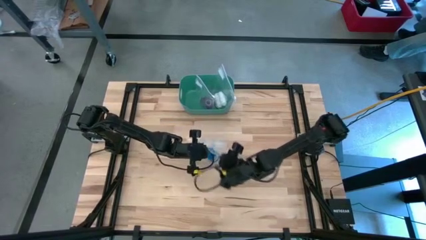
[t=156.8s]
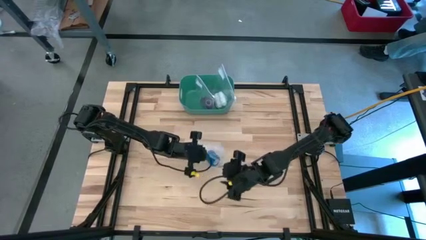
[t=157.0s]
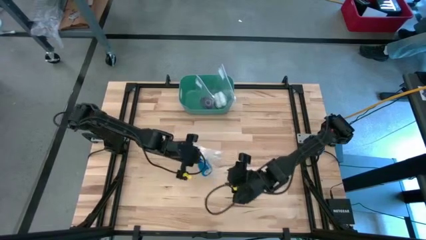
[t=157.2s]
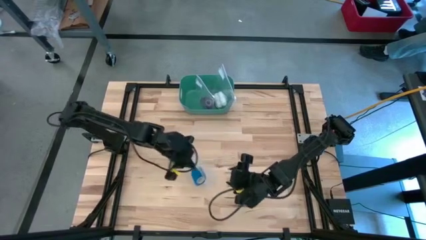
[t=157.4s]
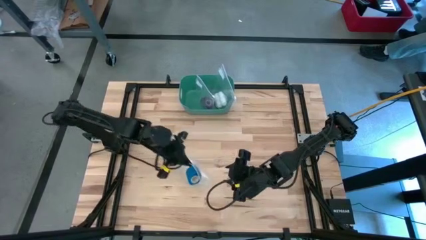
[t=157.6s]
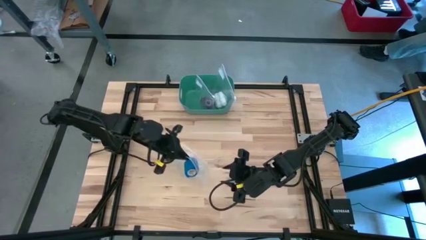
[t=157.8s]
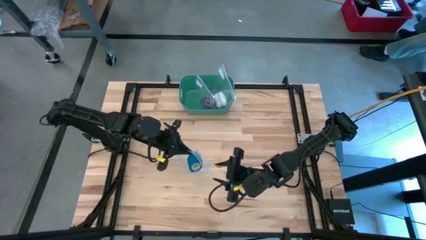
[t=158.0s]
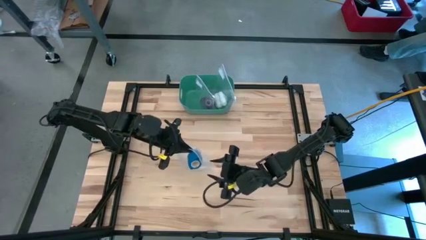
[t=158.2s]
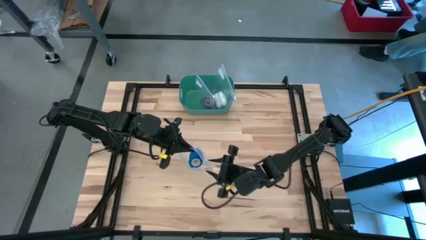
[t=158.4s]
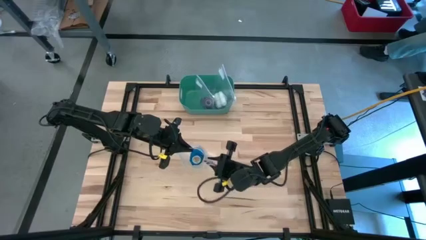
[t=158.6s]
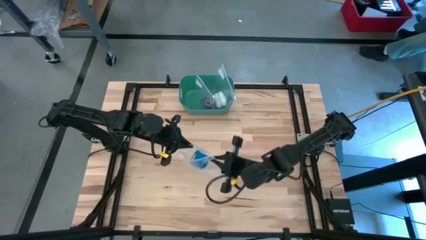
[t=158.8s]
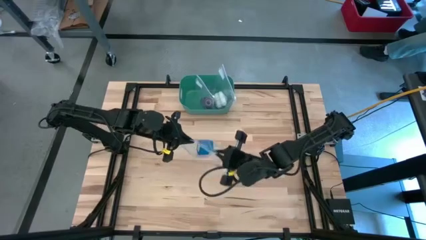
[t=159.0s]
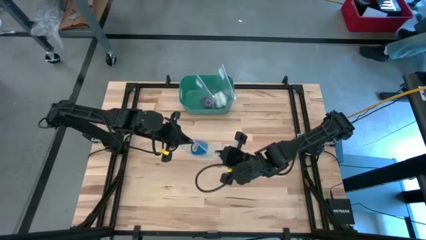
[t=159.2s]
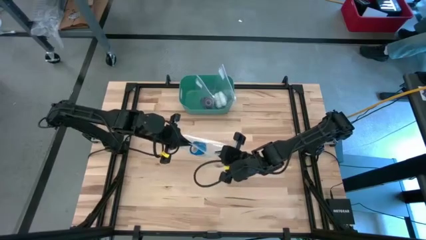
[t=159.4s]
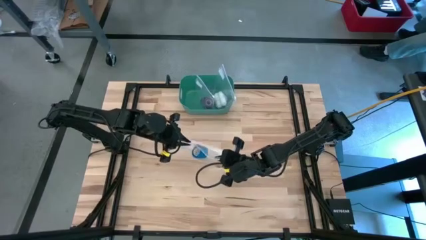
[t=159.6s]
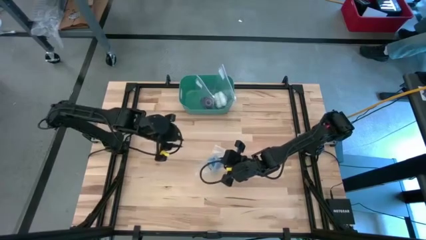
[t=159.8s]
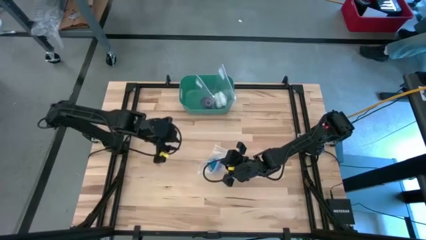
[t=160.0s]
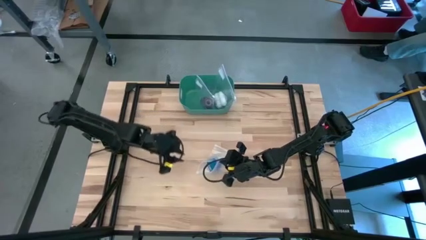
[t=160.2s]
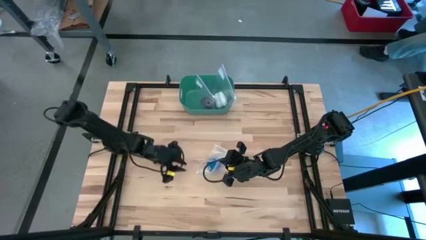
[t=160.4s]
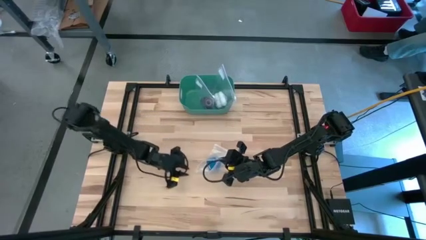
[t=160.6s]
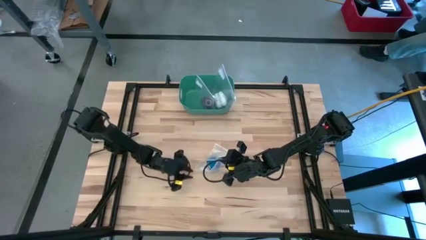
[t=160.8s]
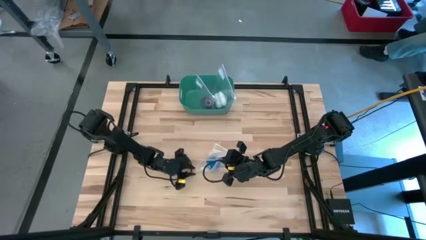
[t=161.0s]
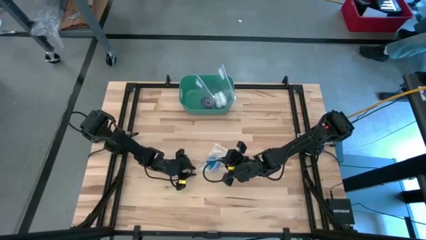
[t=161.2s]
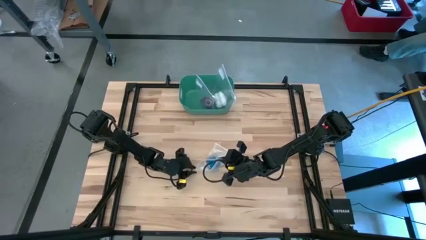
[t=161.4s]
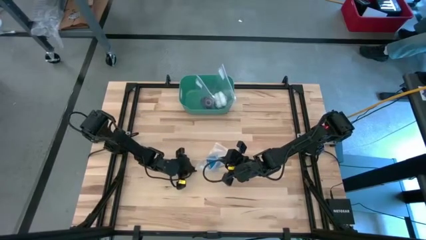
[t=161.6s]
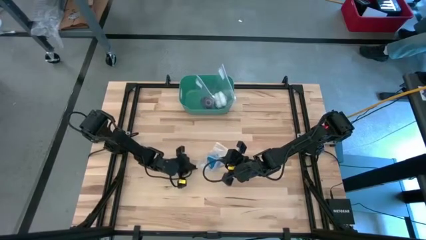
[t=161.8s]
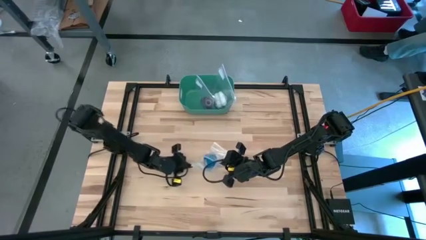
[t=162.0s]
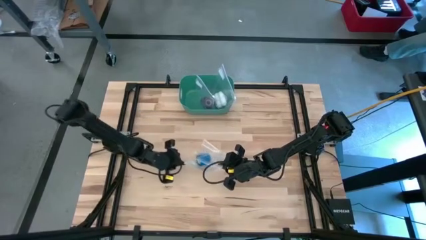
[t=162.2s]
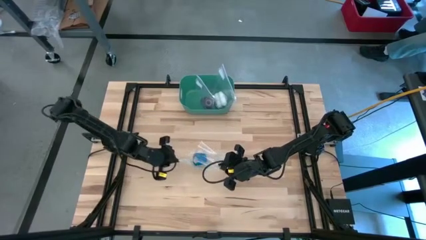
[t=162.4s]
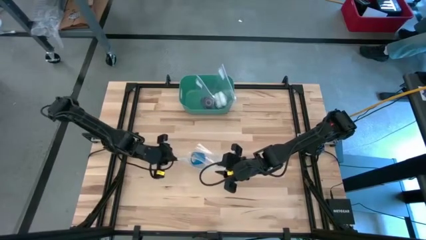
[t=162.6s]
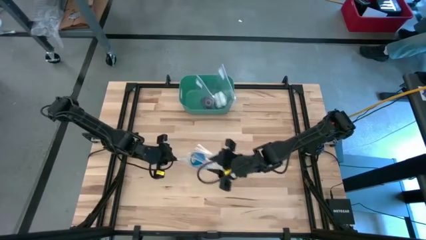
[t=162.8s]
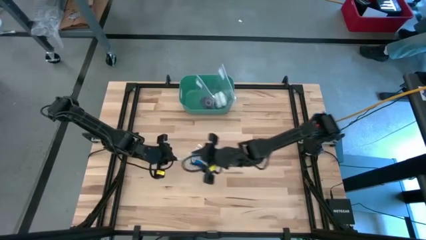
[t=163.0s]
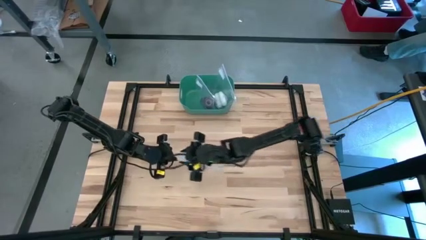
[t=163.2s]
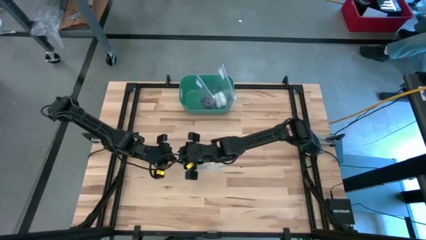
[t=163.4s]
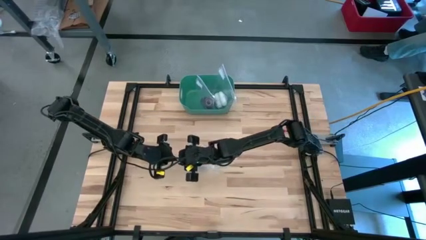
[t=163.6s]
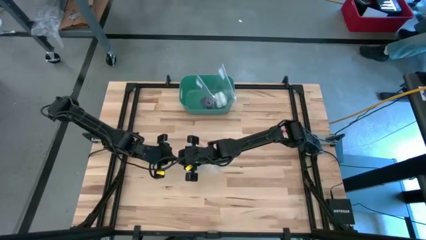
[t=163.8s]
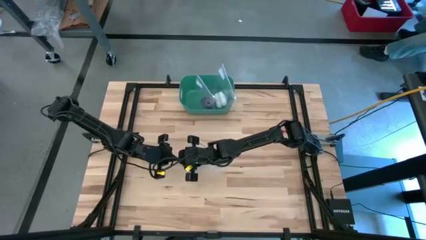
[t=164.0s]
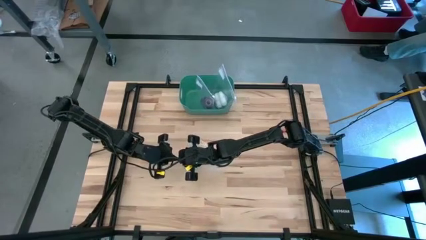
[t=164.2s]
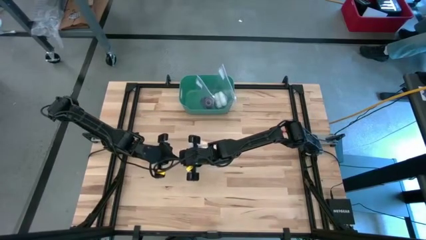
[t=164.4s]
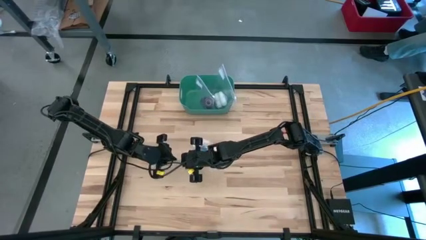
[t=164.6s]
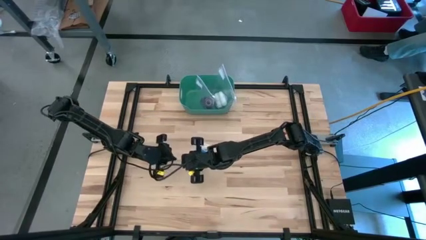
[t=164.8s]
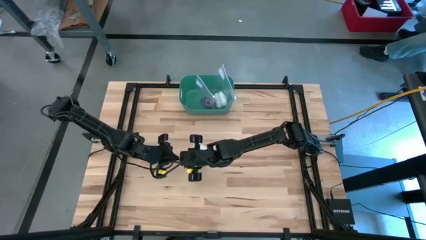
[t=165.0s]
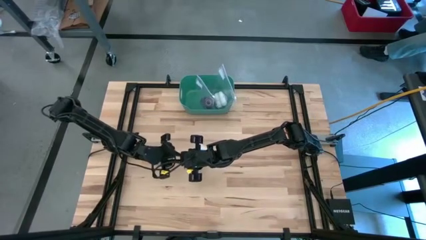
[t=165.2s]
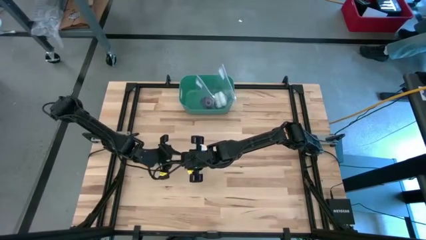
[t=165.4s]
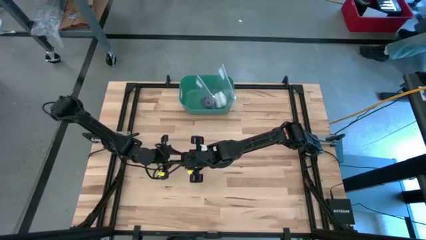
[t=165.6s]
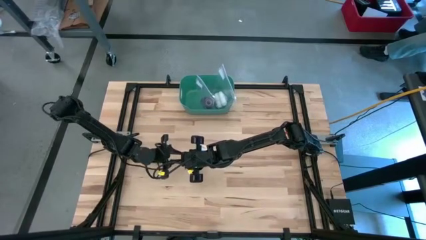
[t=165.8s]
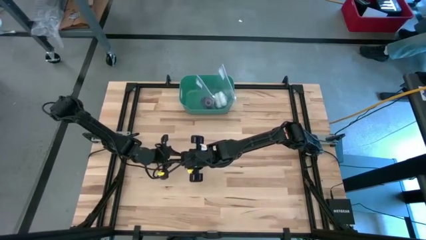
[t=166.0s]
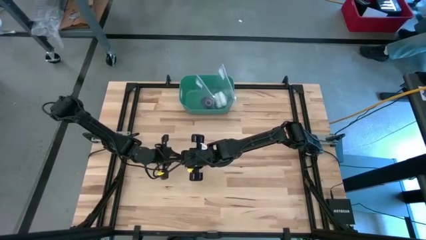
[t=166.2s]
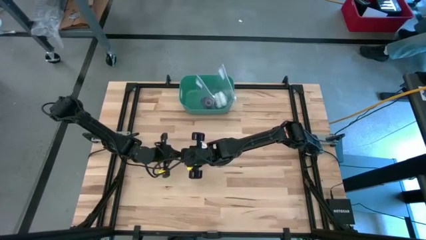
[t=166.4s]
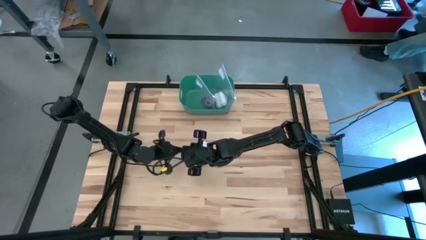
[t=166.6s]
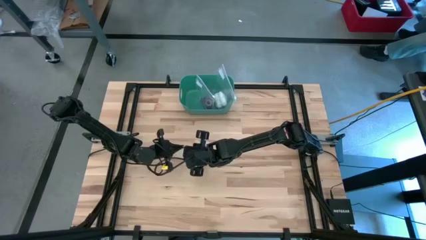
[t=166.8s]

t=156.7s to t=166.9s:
Task: Roll bandage
Close the transparent zip bag

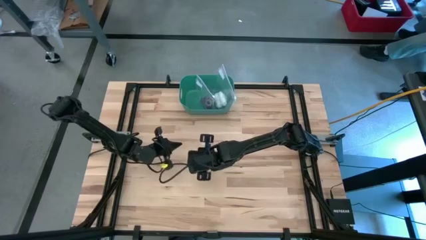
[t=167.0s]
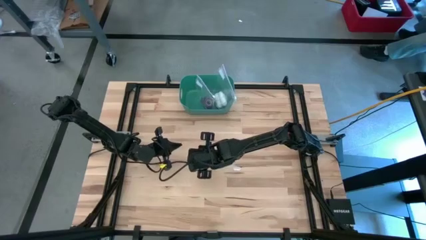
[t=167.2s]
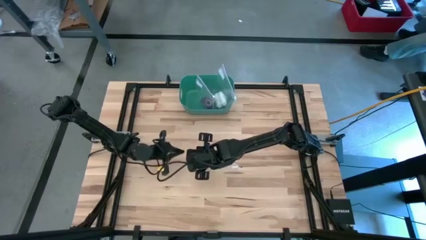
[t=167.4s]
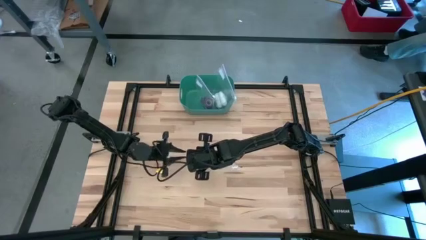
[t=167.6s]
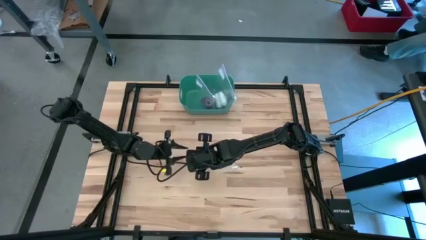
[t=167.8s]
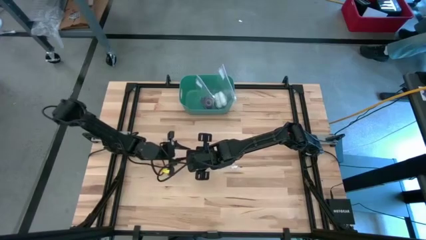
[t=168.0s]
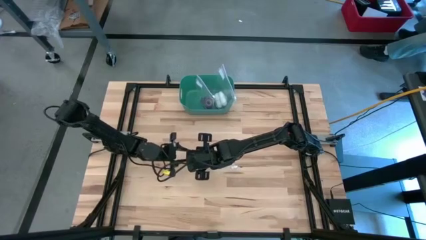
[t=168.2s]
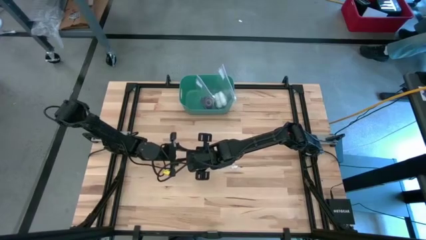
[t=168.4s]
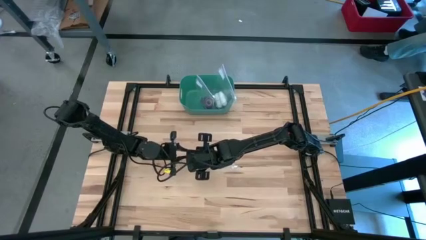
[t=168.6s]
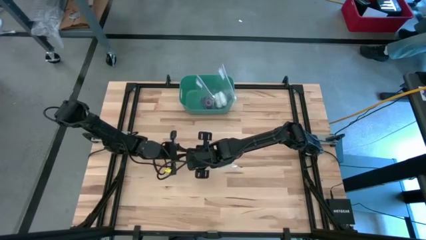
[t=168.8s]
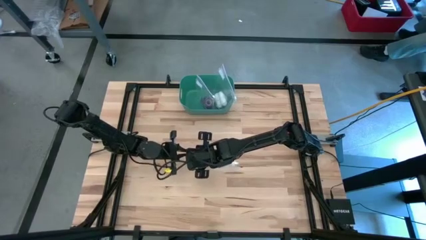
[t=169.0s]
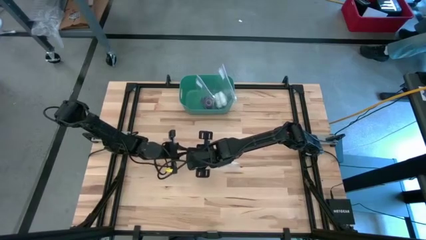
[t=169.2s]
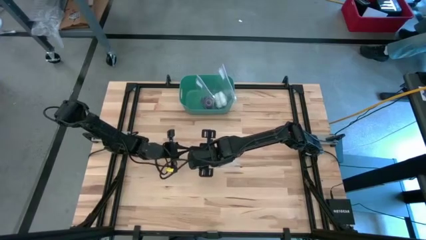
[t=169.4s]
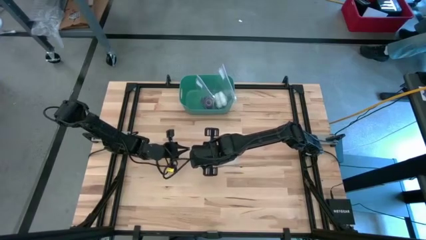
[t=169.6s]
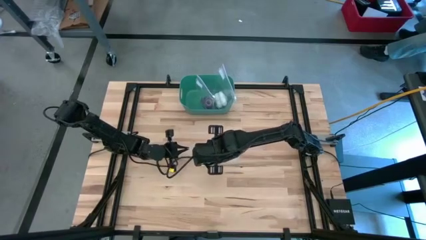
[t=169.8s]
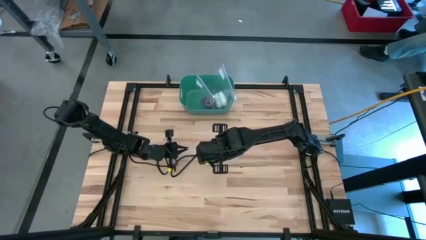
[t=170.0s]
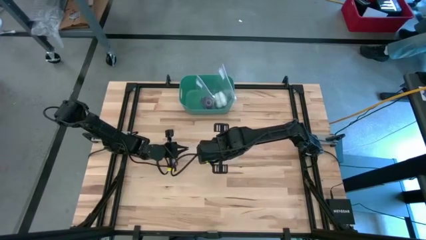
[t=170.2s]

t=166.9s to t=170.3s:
Close the transparent zip bag

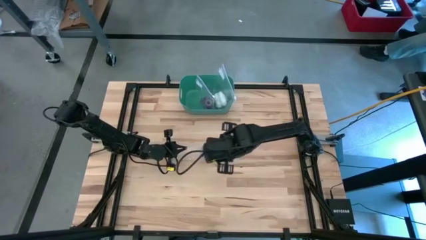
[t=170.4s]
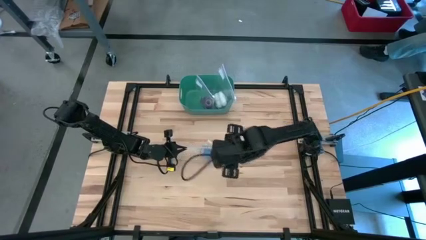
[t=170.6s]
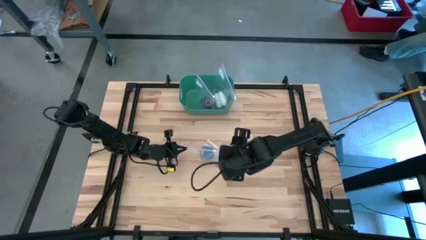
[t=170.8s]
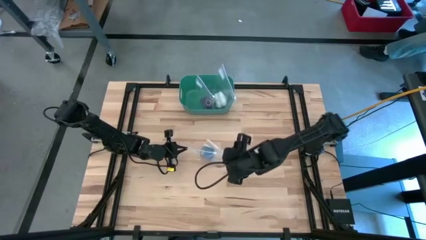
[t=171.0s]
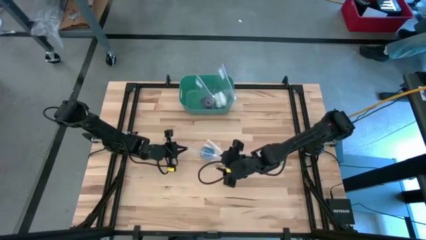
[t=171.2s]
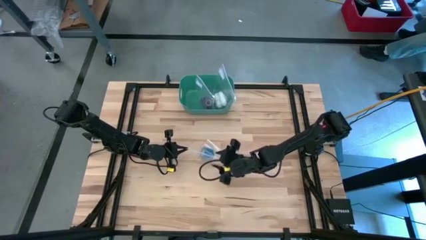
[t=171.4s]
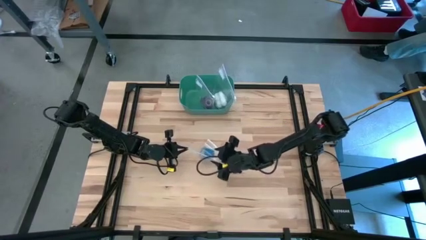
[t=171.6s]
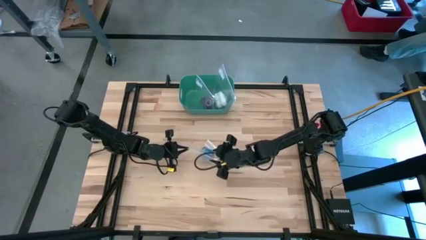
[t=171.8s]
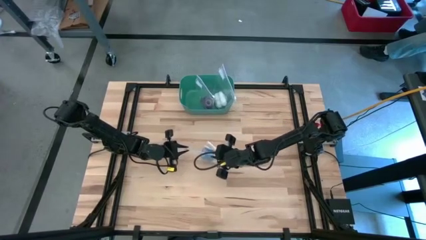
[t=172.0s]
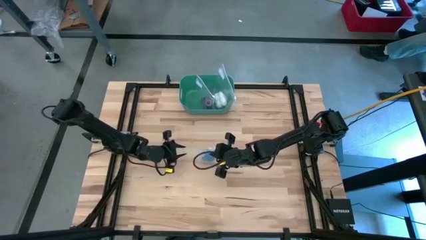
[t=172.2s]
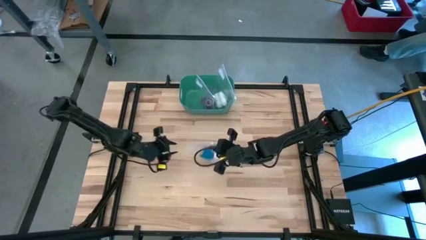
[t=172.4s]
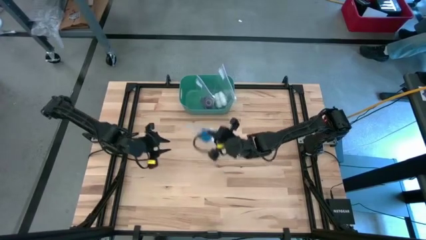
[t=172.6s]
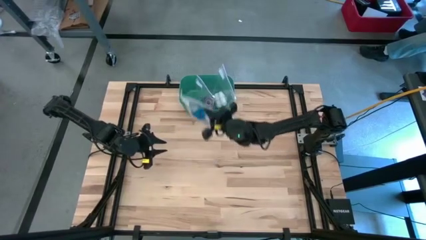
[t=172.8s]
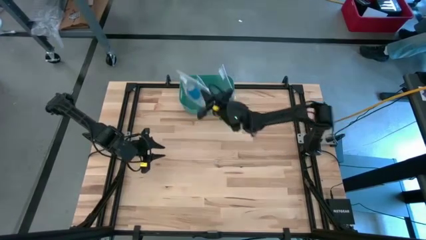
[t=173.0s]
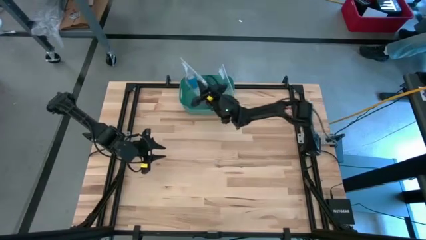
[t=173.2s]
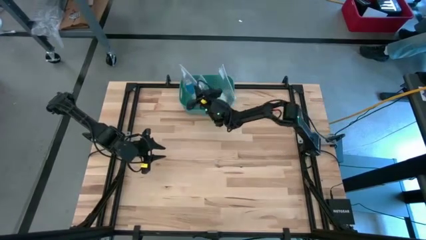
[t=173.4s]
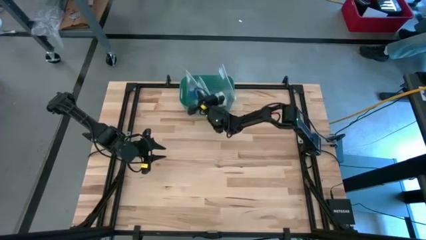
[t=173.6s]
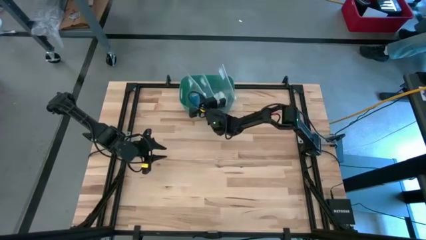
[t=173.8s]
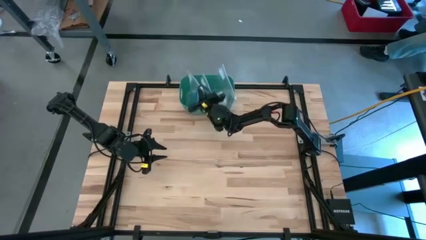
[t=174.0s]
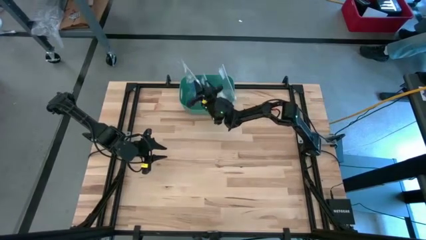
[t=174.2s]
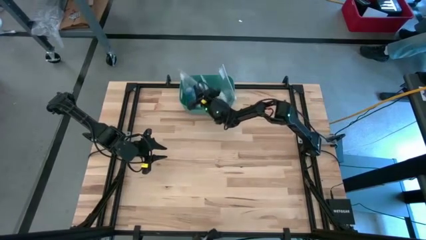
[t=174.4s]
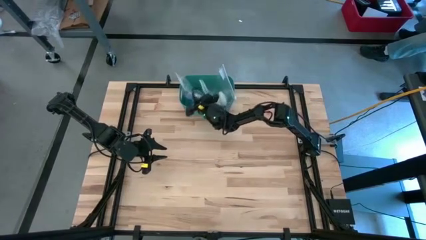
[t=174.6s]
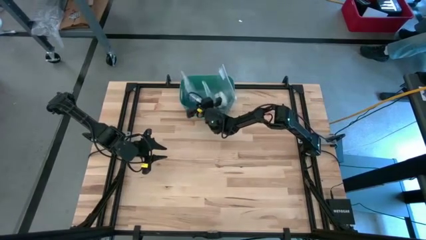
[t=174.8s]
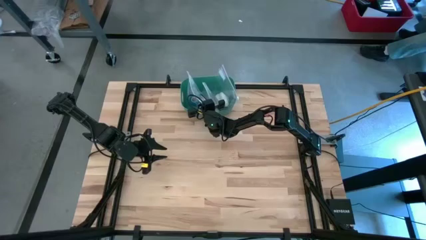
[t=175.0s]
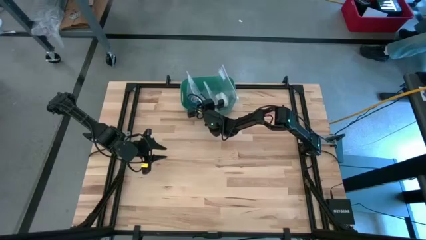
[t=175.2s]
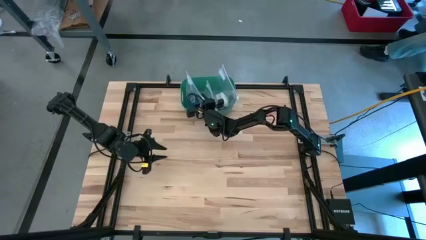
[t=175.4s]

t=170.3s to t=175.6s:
Put the transparent zip bag into the green bin
